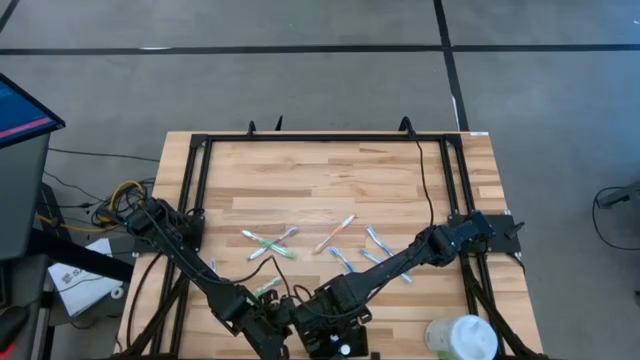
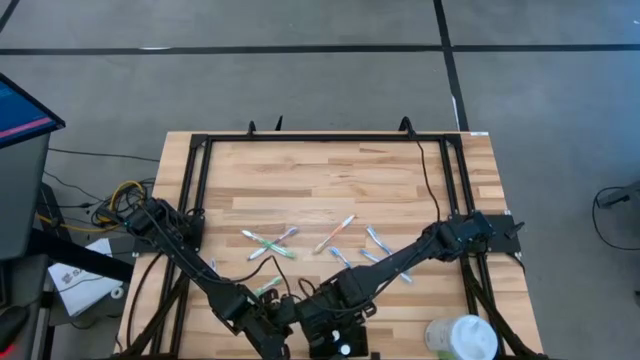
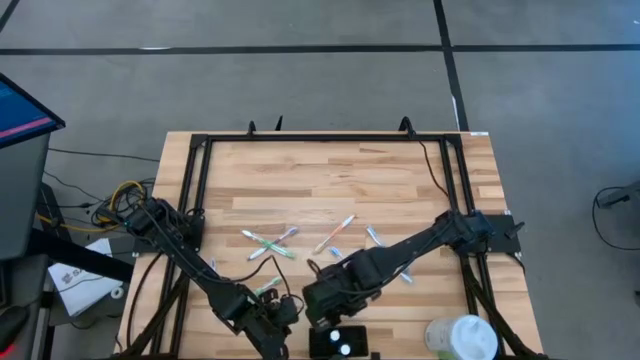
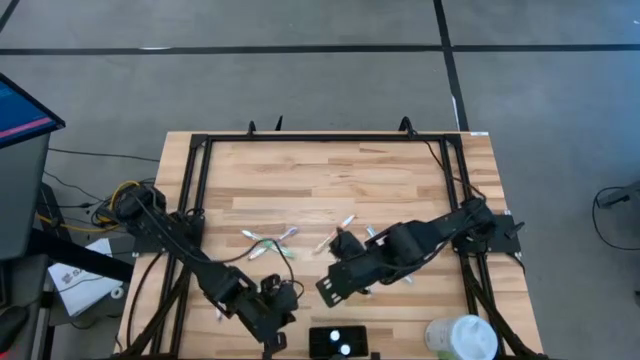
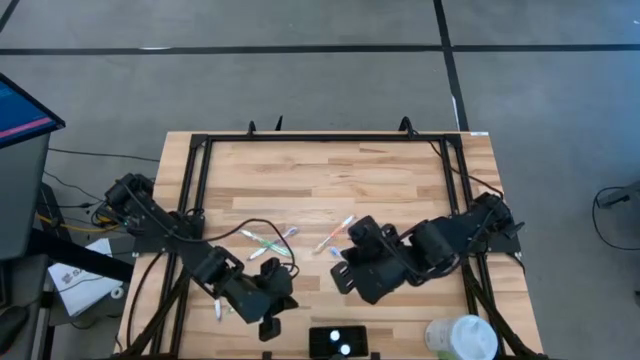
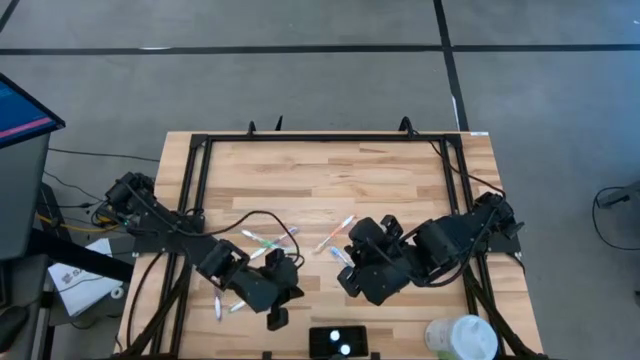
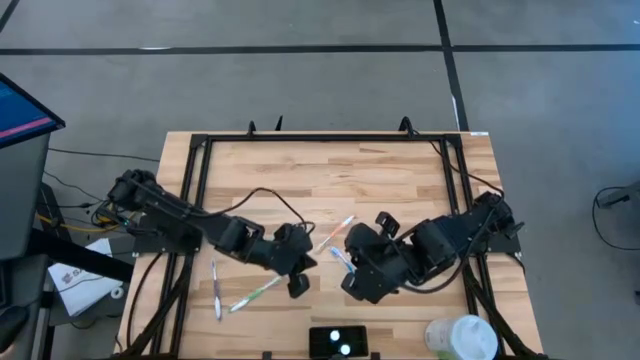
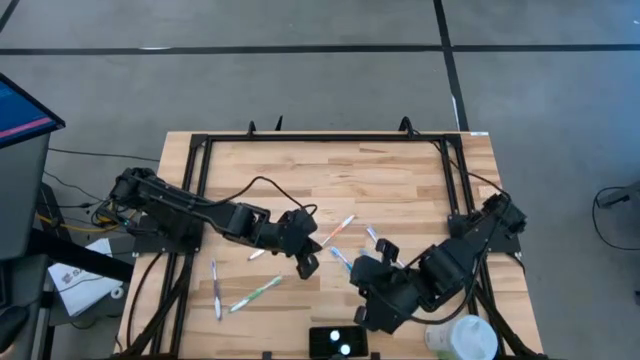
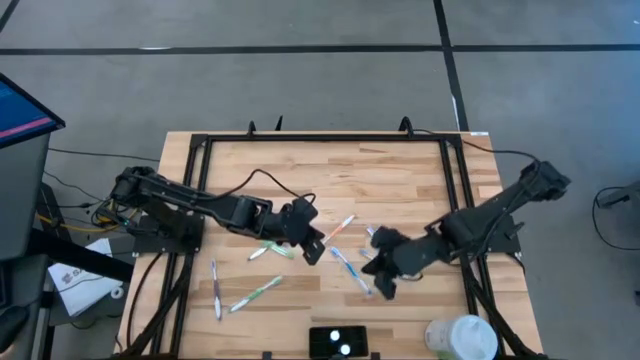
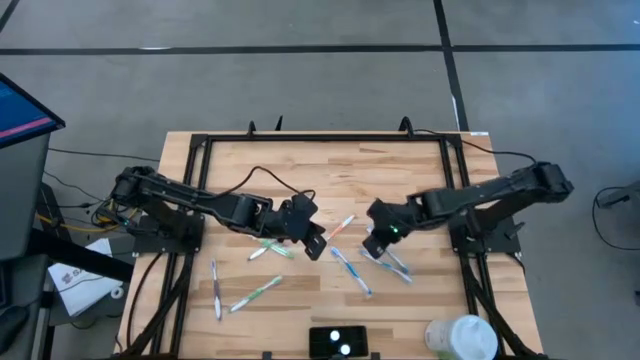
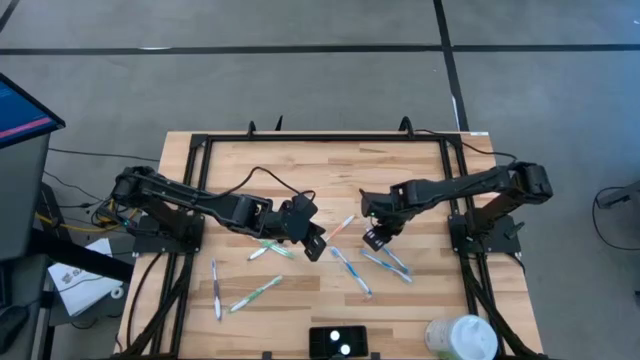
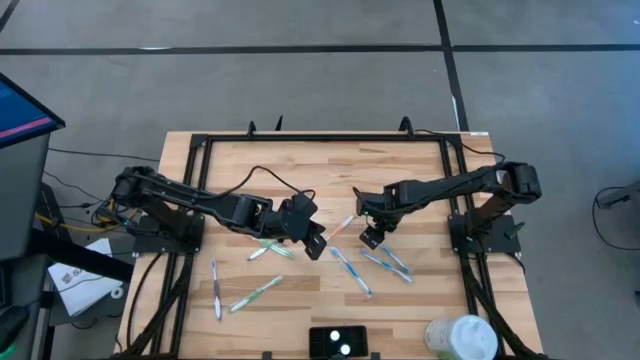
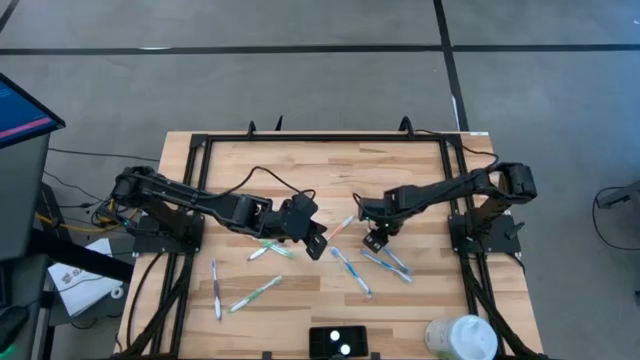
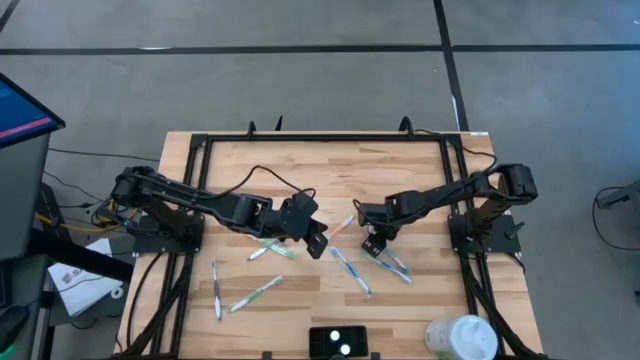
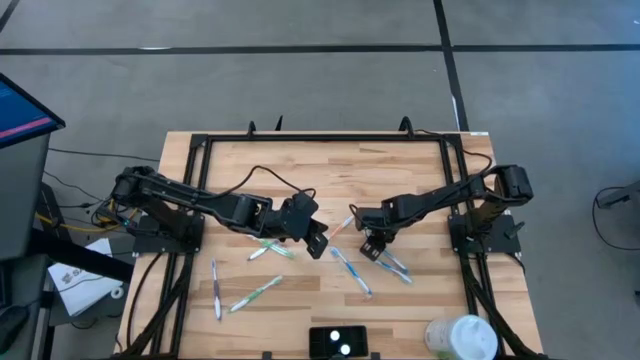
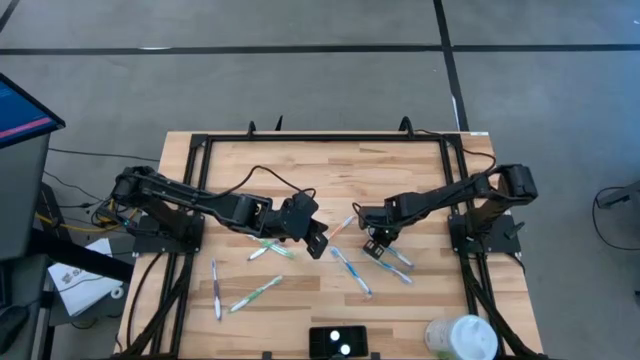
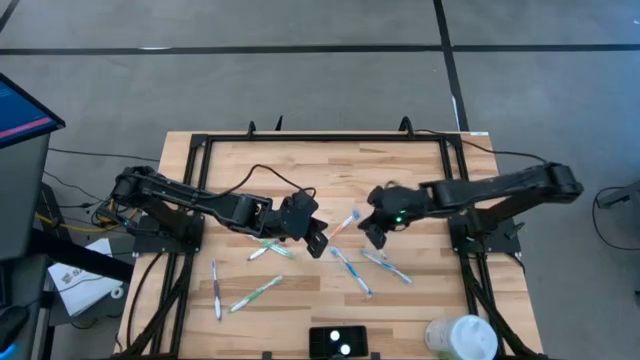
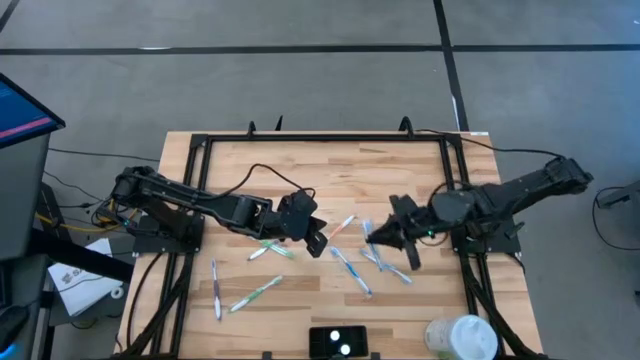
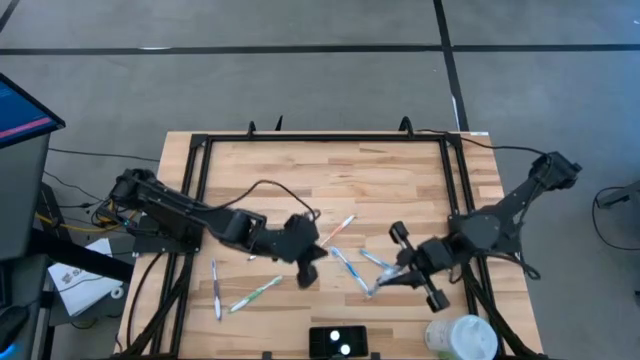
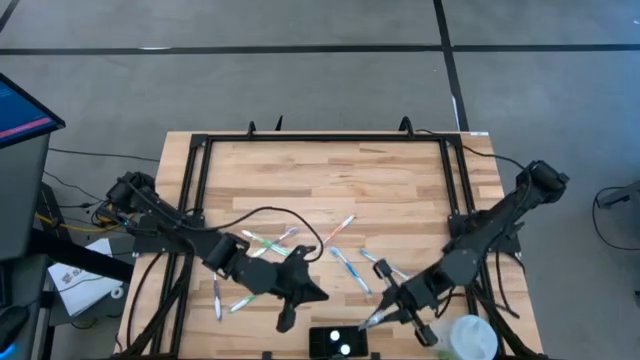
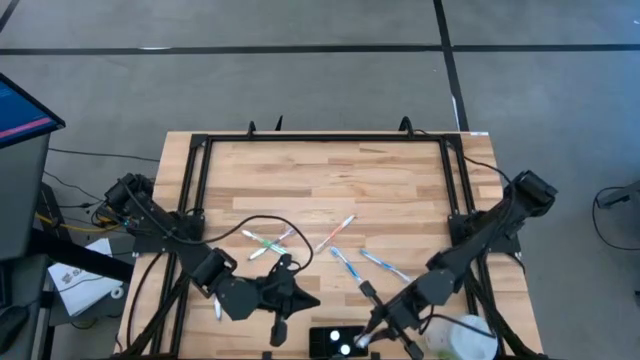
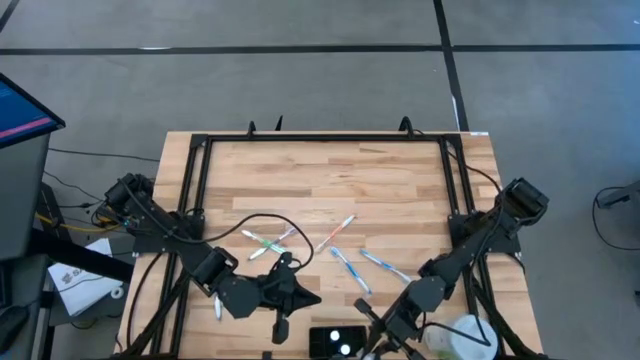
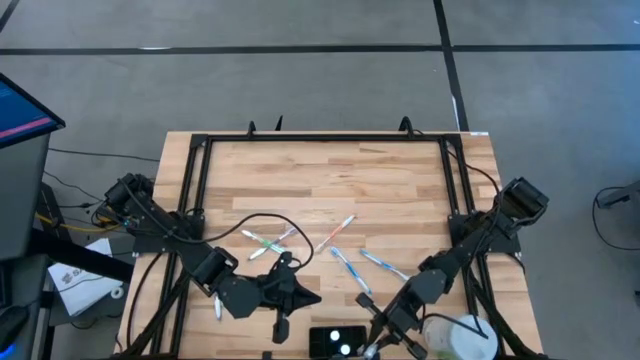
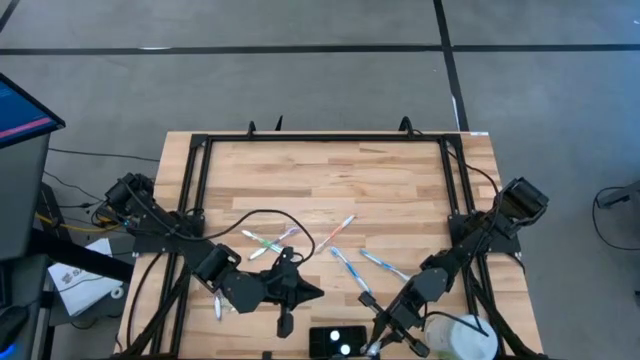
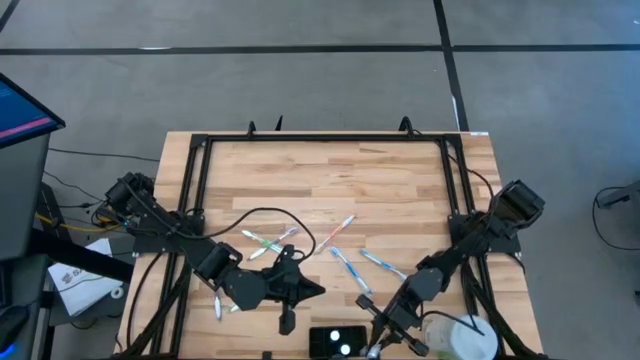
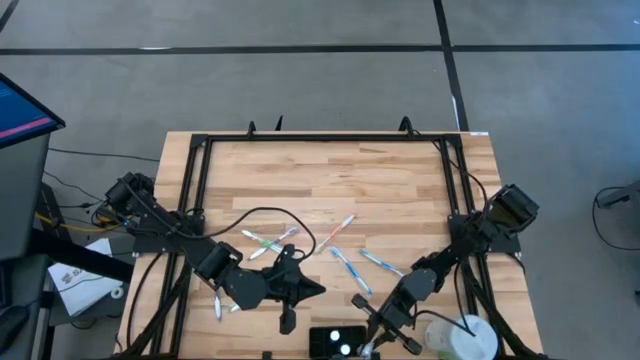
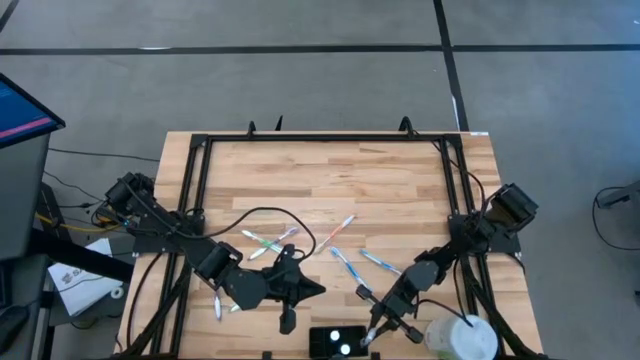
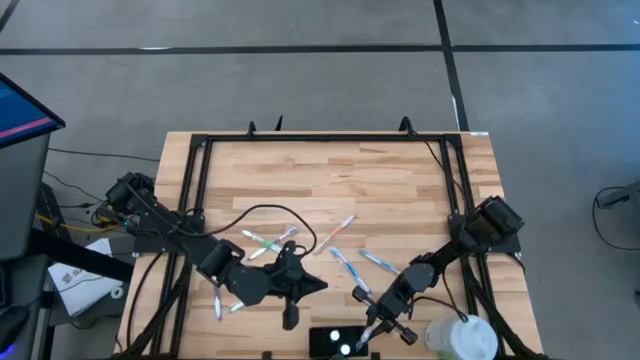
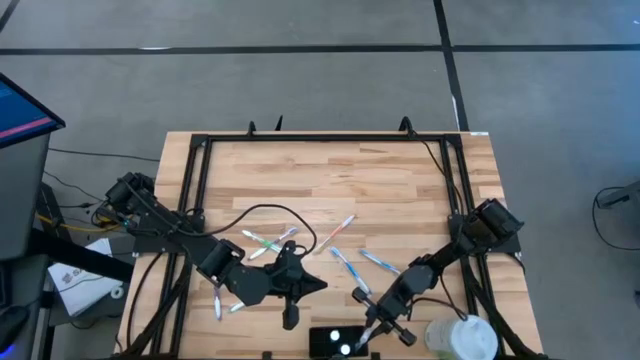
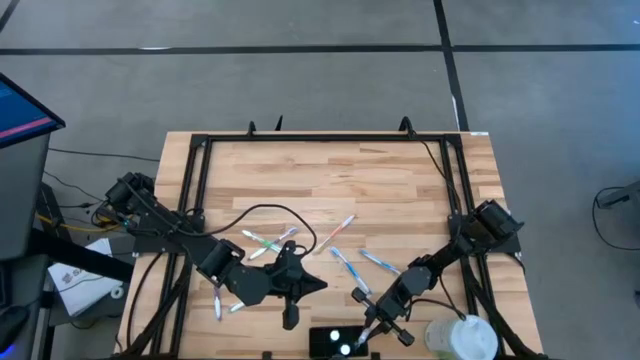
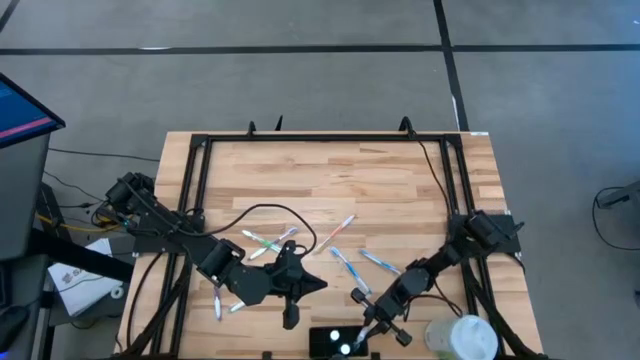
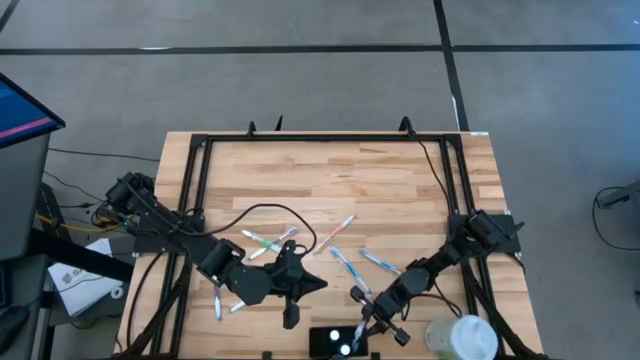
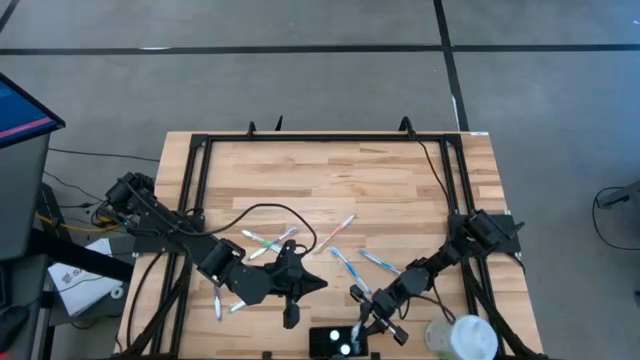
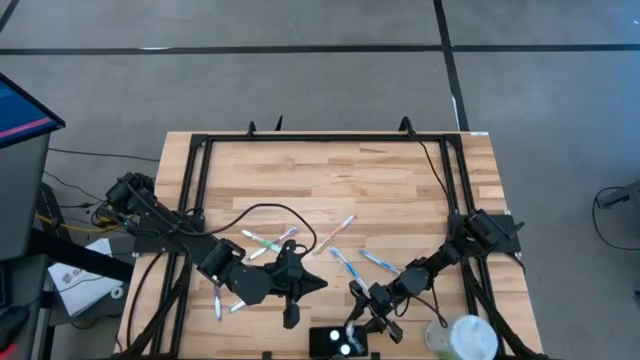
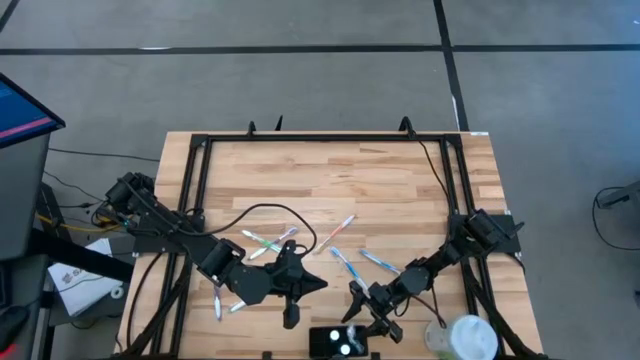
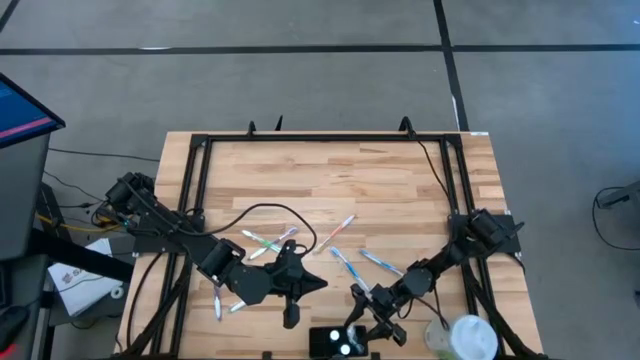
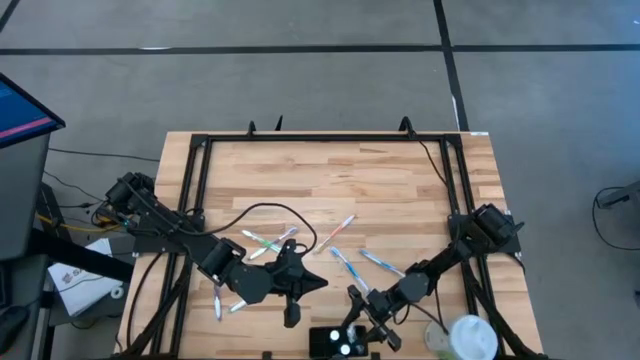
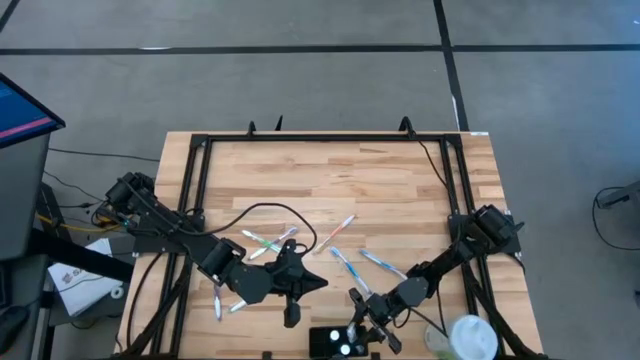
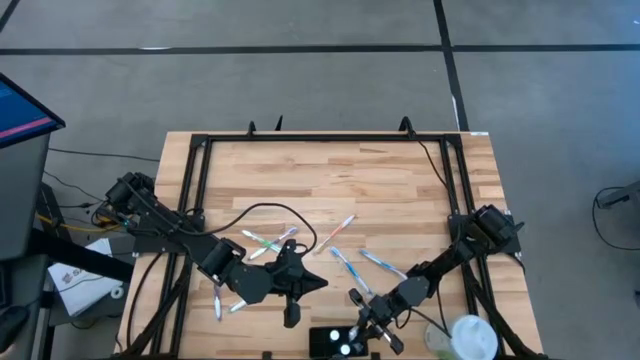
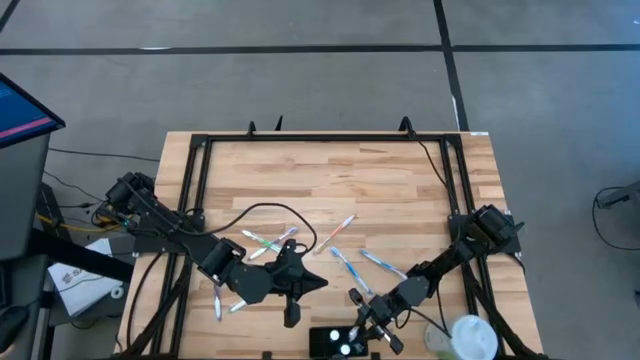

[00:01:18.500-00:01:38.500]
Task: Pick & Place toothbrushing station
Put the right blue toothbrush into the black mesh organizer
